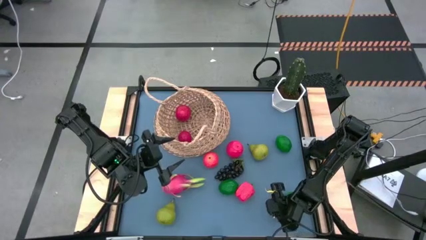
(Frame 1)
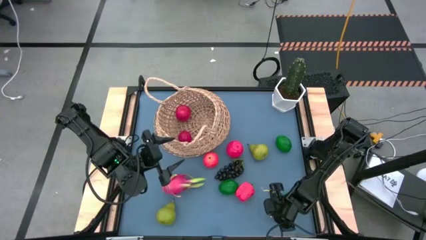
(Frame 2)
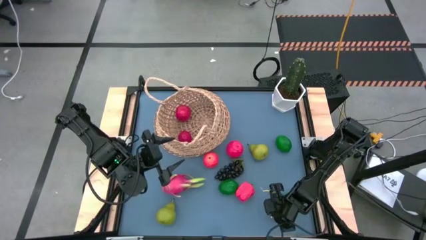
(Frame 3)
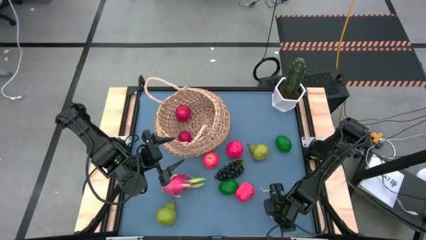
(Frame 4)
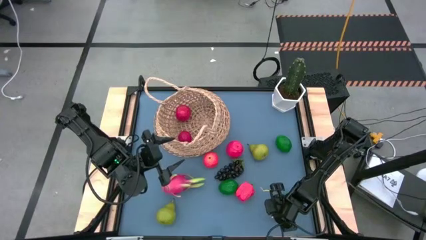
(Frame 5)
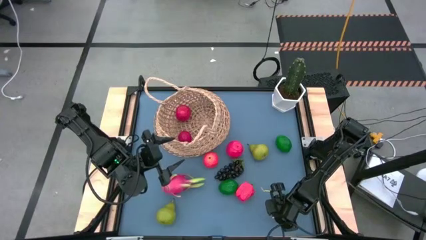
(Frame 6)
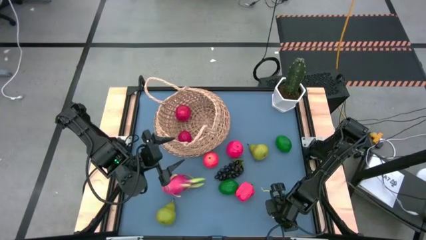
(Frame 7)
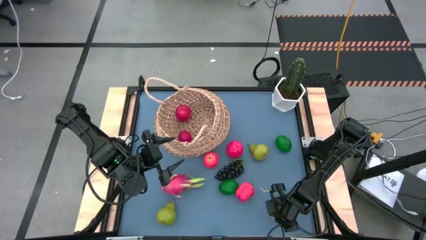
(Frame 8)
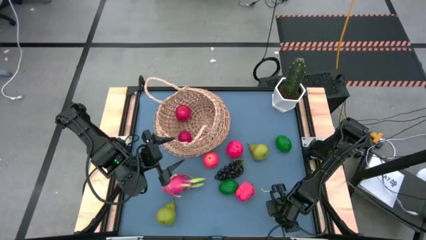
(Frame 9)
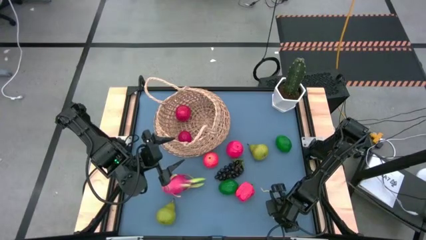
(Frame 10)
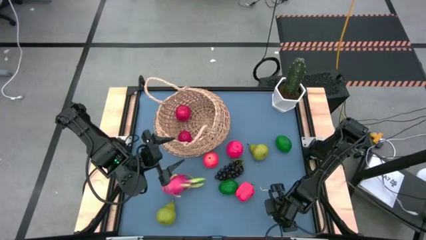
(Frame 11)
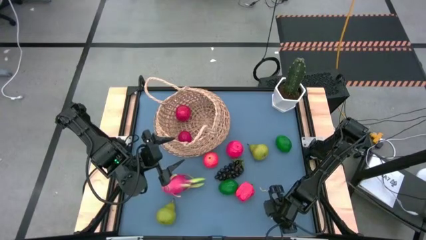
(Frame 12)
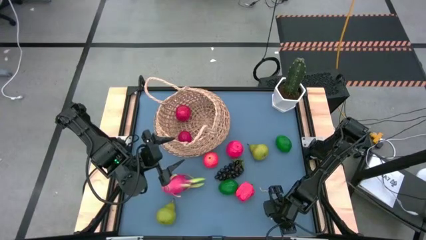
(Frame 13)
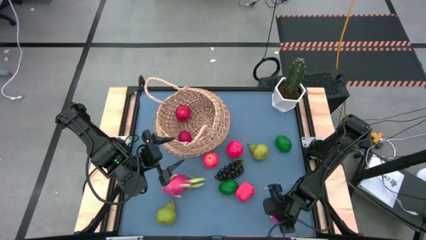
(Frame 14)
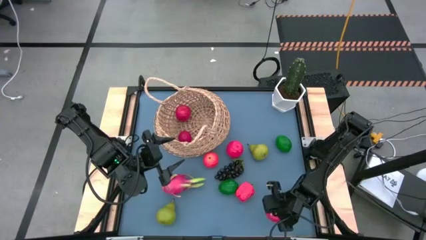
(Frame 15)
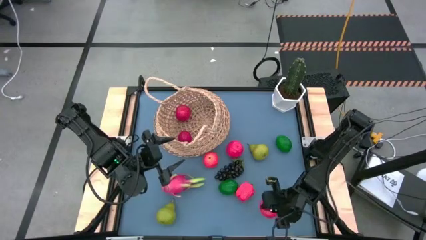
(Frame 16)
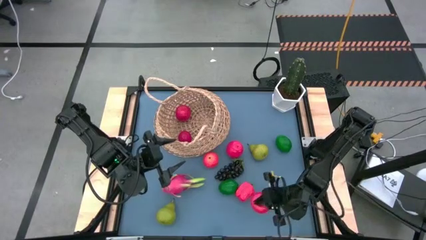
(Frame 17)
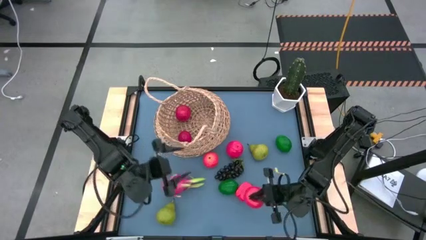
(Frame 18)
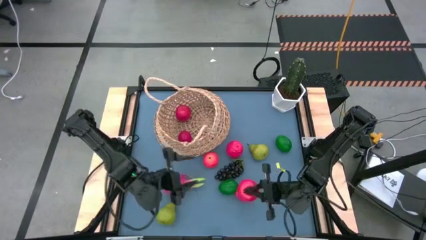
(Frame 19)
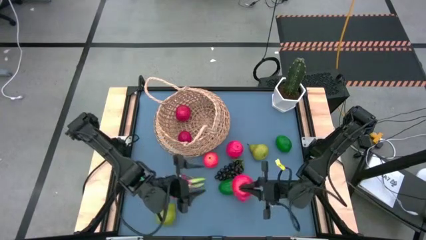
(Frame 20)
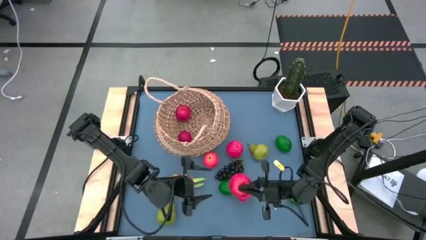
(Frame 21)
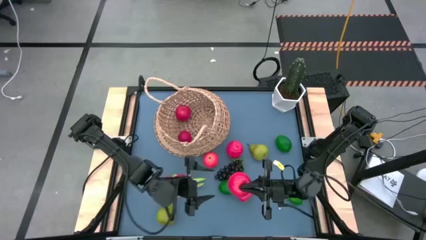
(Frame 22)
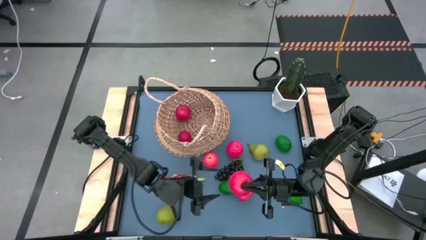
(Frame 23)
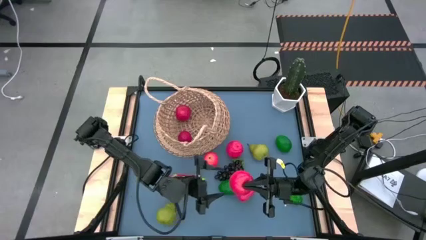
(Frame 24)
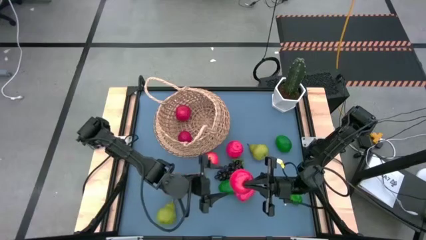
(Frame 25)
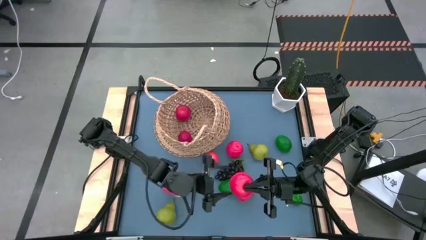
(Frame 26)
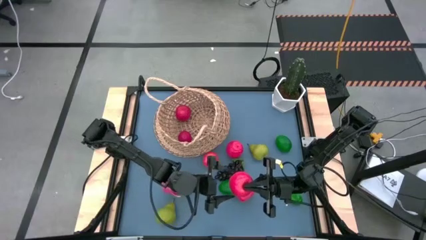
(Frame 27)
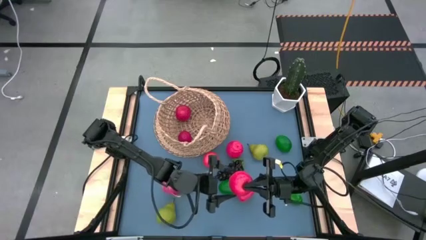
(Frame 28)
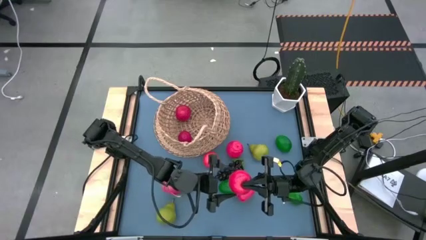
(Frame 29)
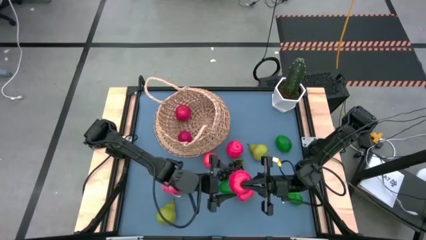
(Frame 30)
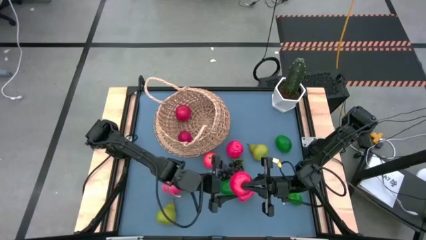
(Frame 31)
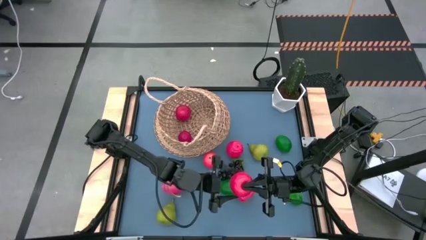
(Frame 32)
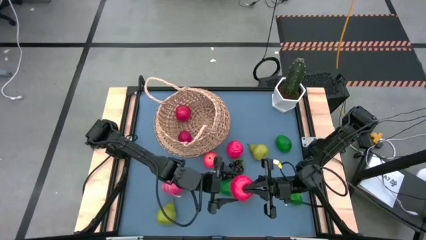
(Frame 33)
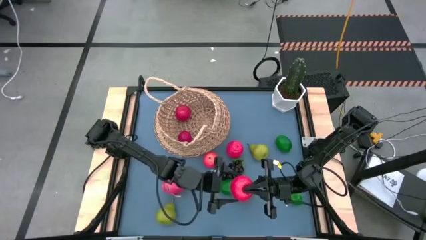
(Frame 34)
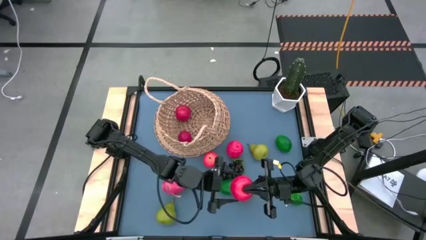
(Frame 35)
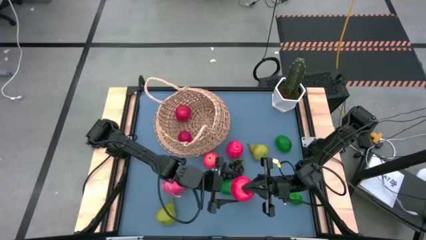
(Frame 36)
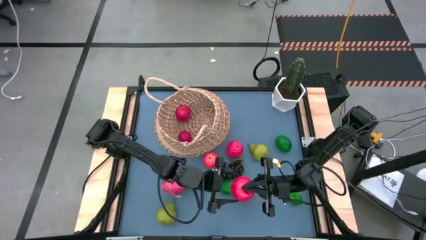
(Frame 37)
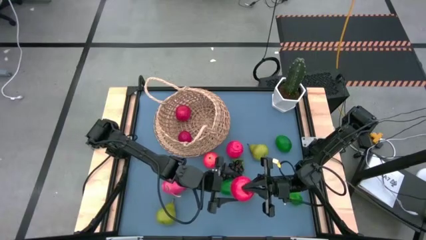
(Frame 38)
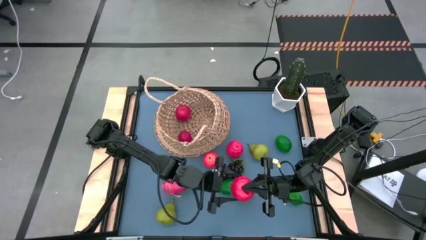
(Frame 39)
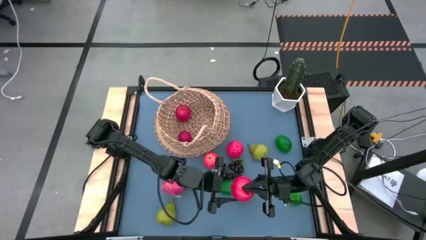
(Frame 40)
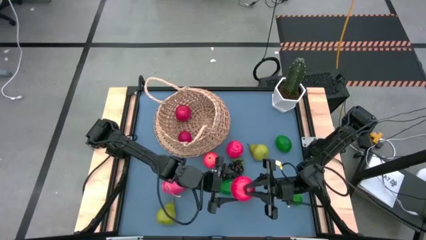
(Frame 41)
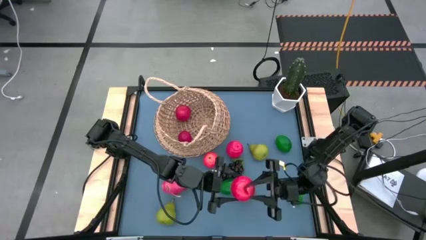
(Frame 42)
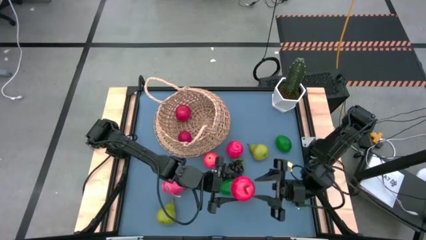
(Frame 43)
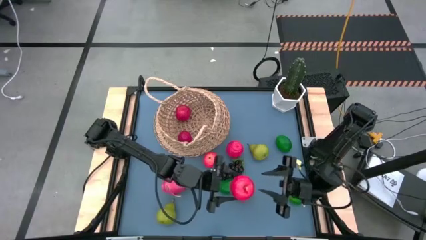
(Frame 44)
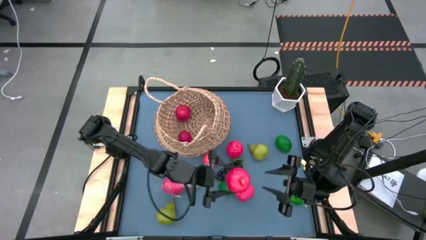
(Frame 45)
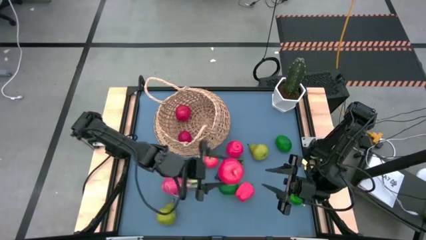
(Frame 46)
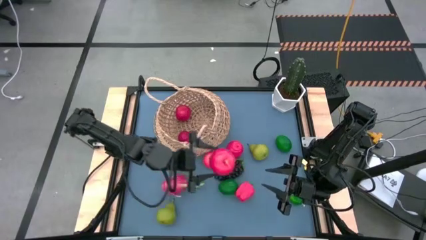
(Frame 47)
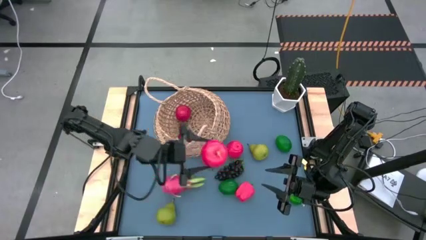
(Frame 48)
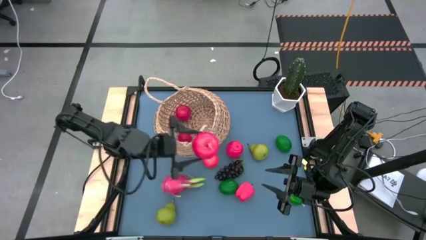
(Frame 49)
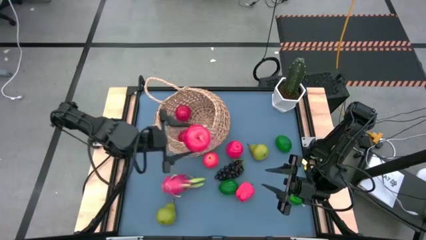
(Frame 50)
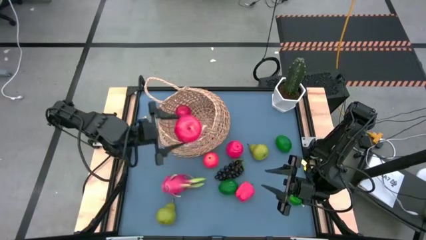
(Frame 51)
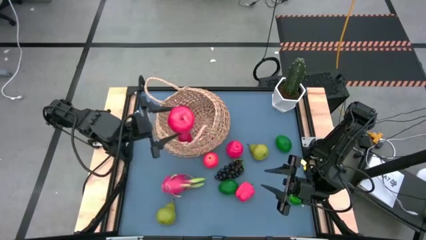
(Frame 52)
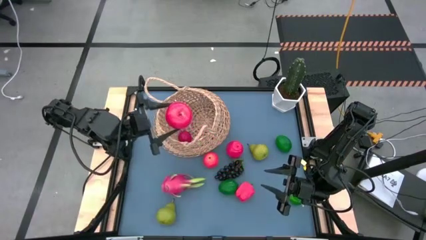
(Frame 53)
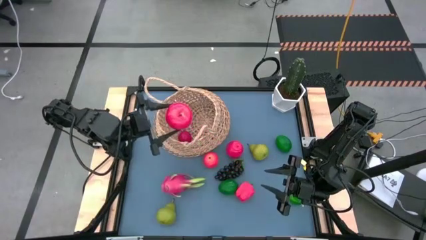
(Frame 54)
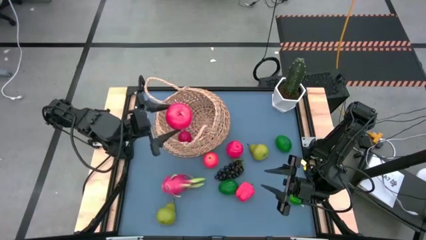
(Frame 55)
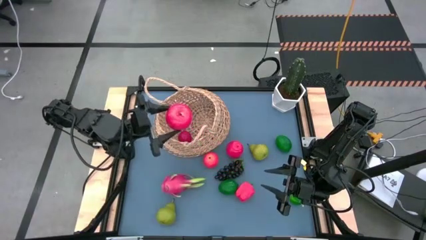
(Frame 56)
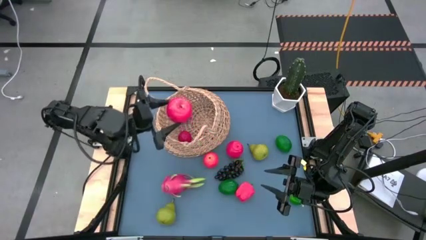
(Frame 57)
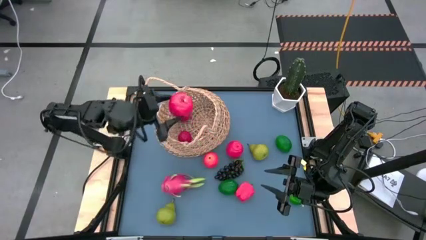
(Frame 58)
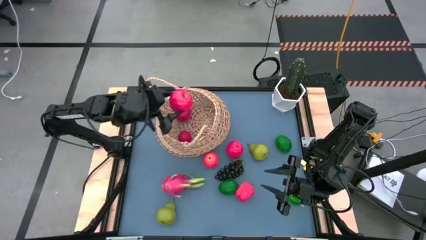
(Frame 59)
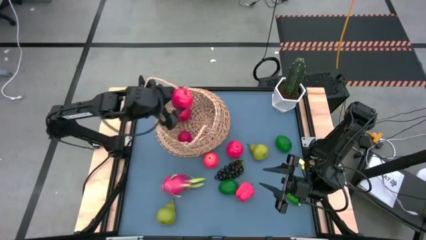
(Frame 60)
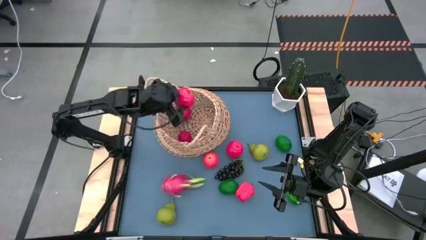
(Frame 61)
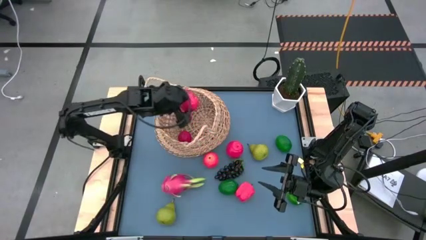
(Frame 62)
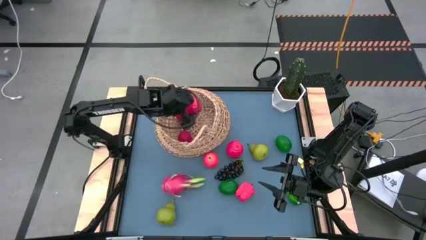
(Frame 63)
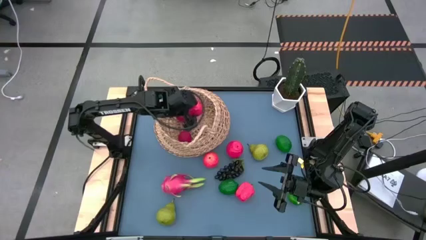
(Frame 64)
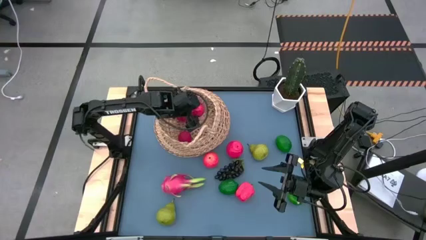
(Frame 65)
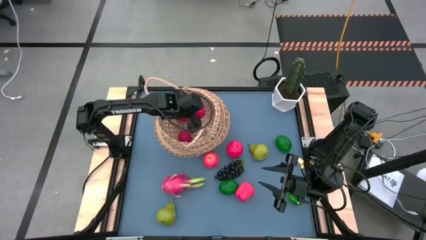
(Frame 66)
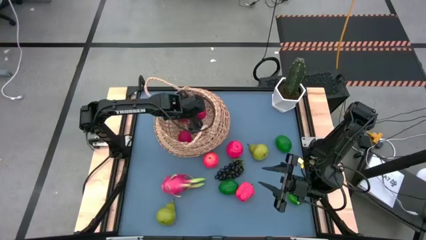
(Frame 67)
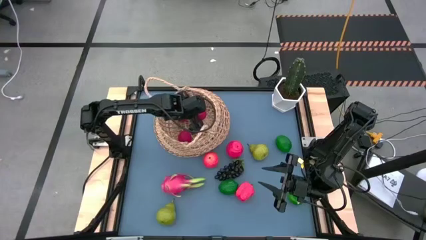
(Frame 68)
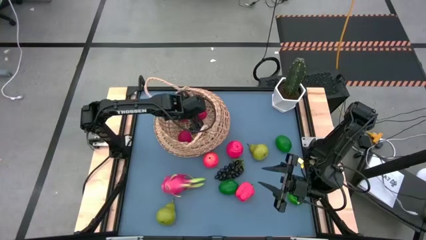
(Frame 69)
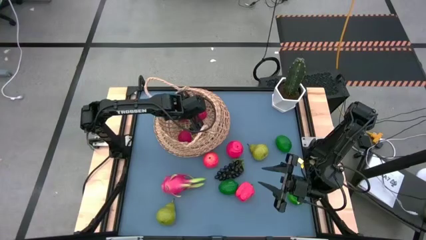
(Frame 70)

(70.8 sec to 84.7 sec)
Task: Build produce basket
Put the red apple into the basket
